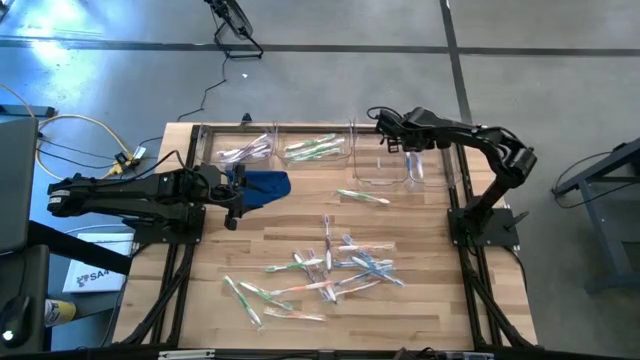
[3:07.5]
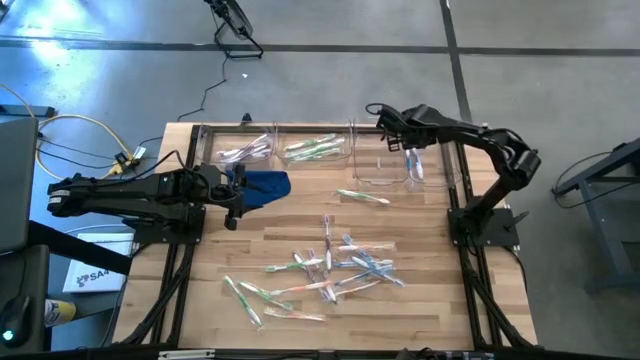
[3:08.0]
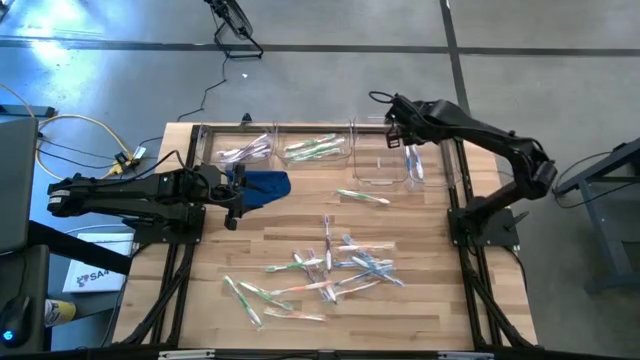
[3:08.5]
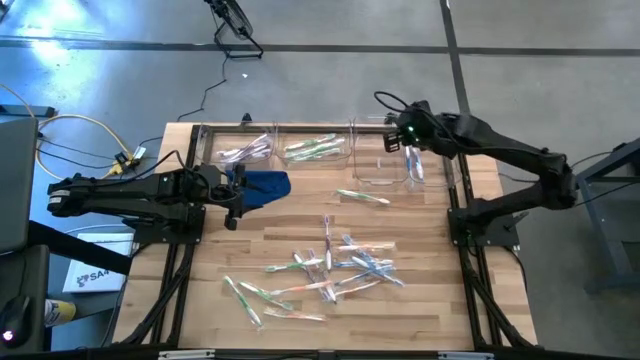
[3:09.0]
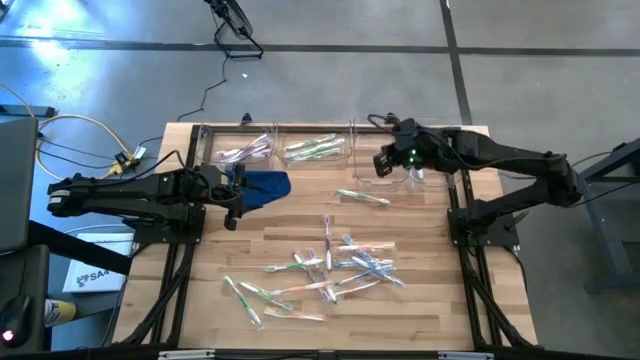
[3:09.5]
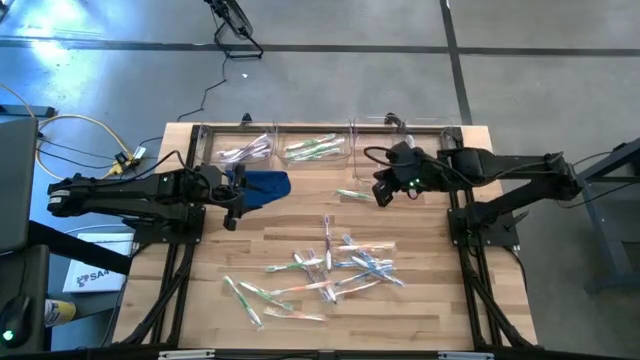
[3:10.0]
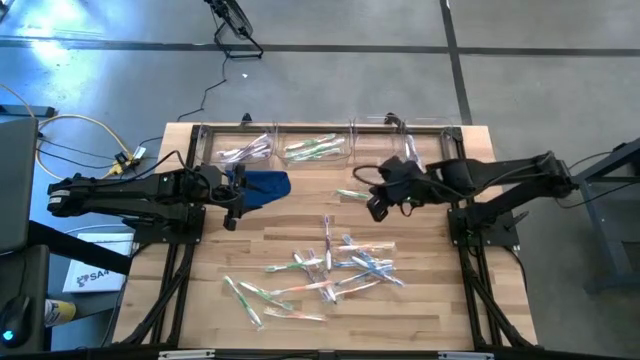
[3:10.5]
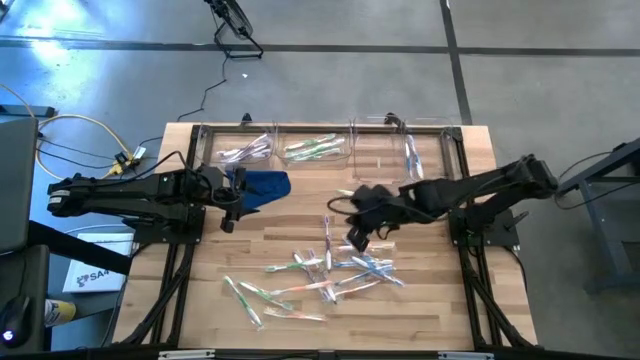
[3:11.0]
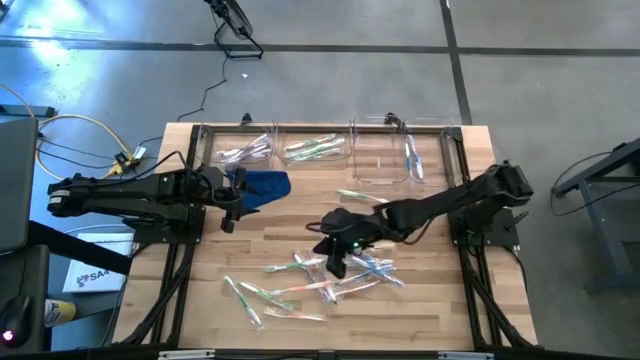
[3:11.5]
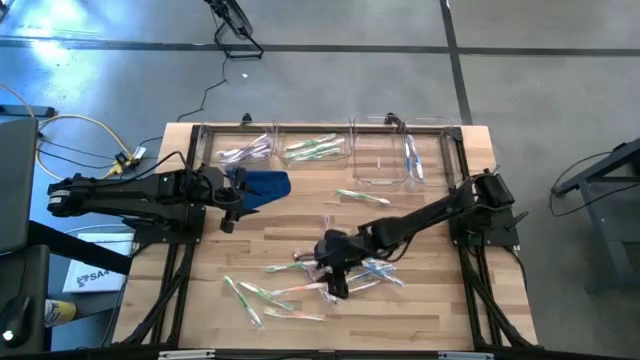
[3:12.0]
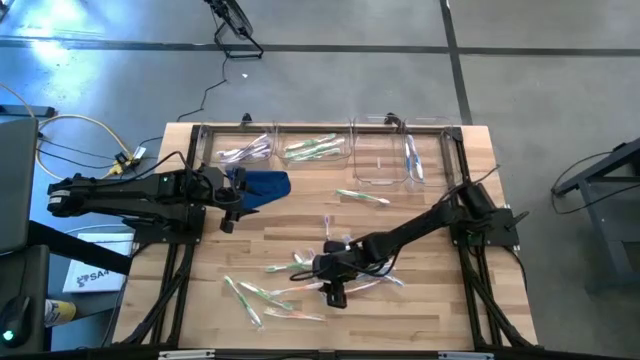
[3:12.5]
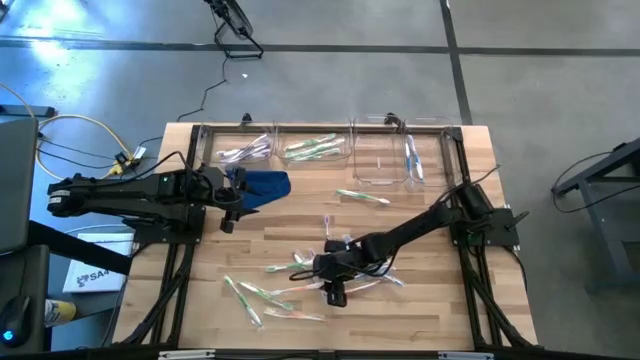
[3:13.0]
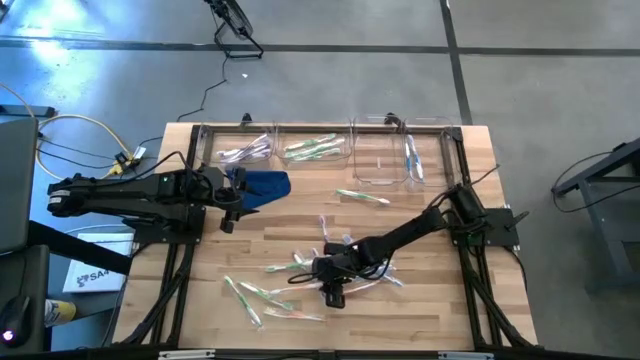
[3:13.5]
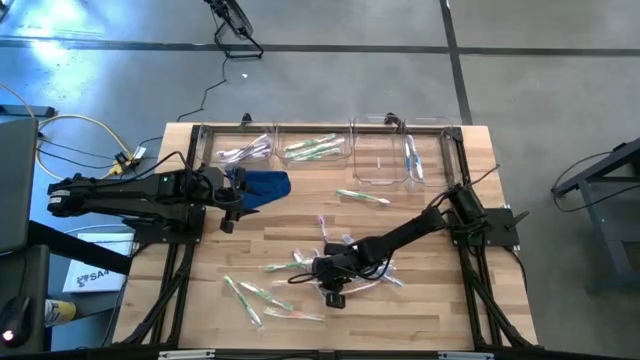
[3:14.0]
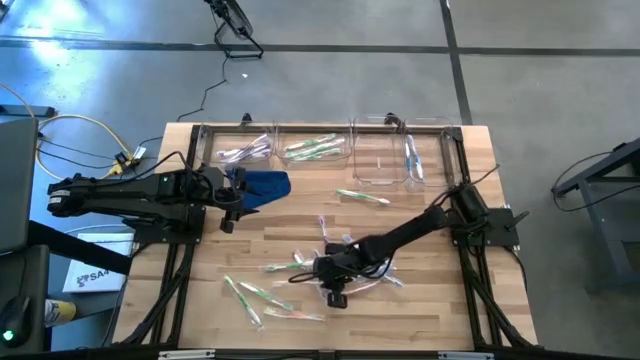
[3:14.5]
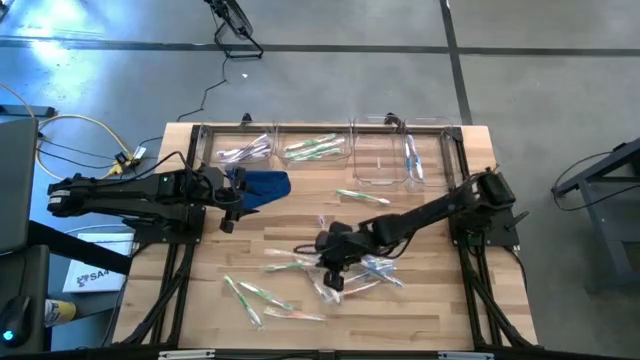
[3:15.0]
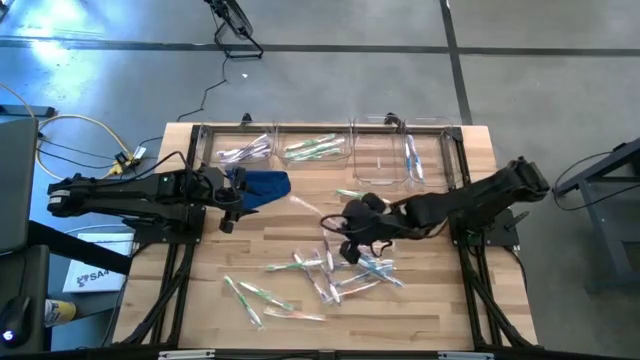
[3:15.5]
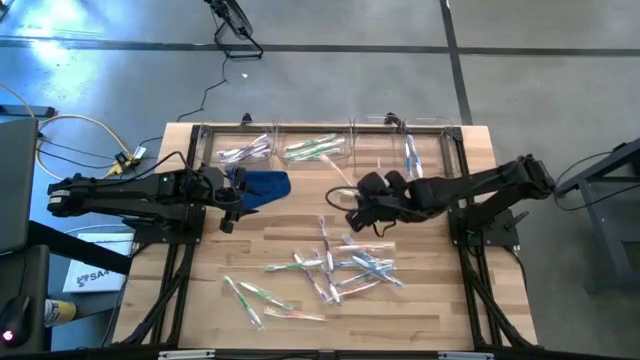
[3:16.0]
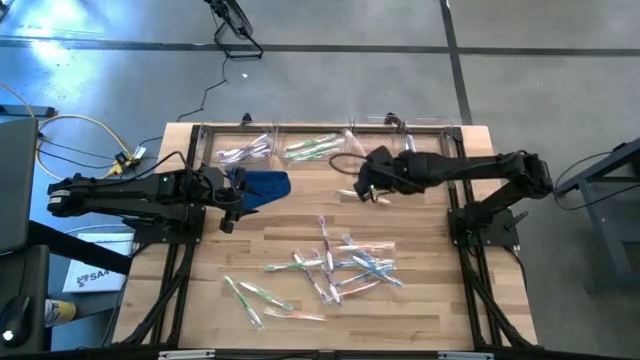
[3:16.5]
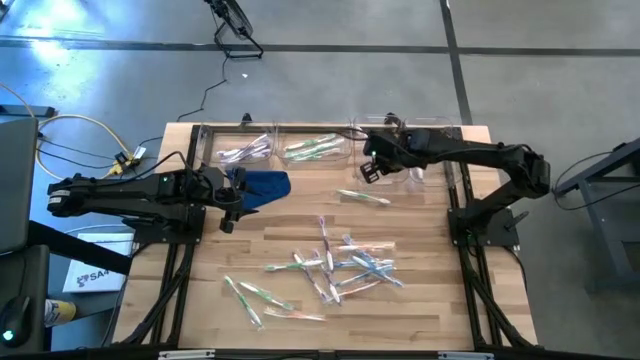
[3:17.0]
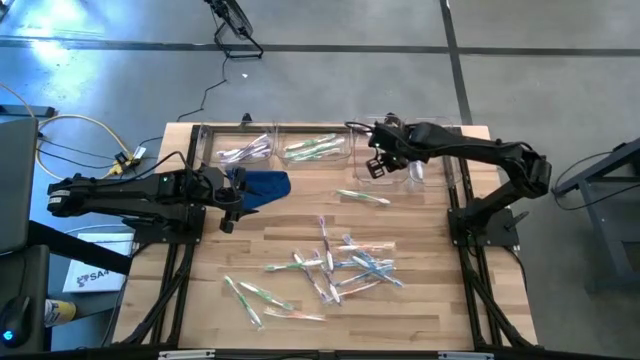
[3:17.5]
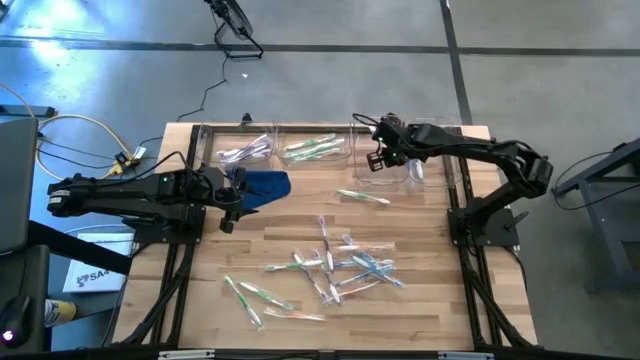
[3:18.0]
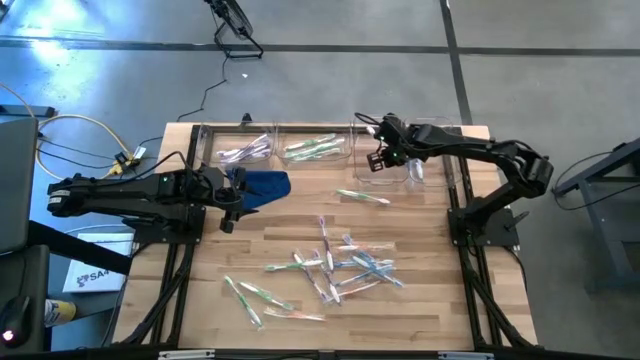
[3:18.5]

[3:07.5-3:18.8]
Task: Pick & Place Toothbrushes
Put the orange toothbrush into the middle right transparent bin

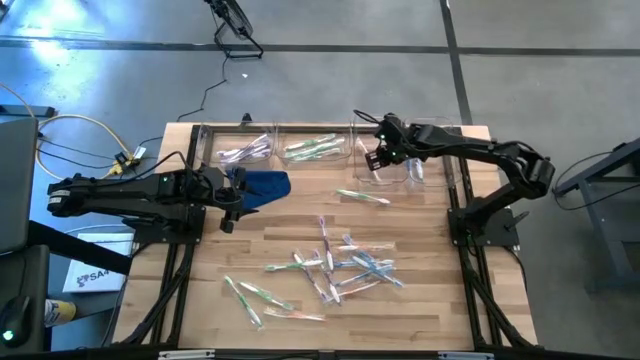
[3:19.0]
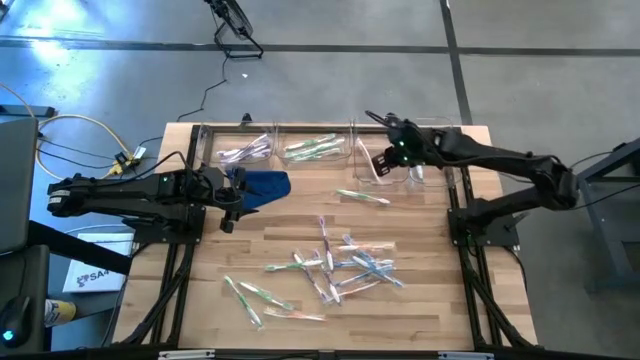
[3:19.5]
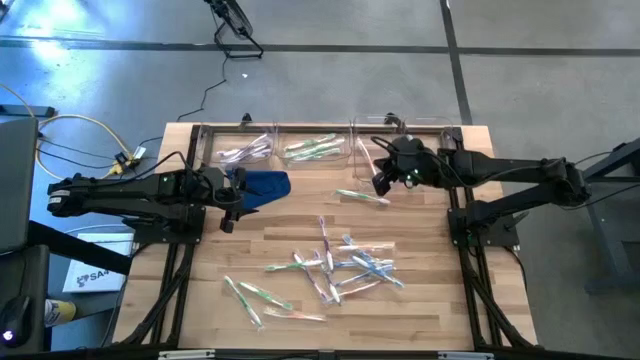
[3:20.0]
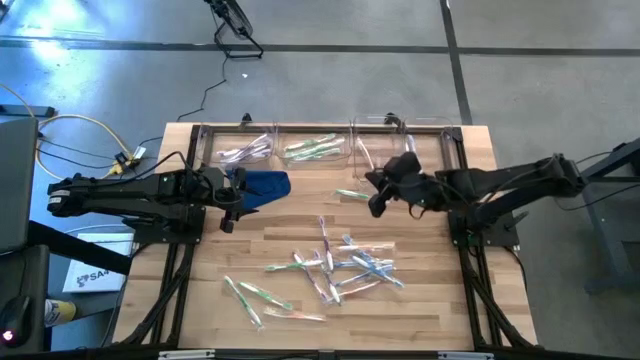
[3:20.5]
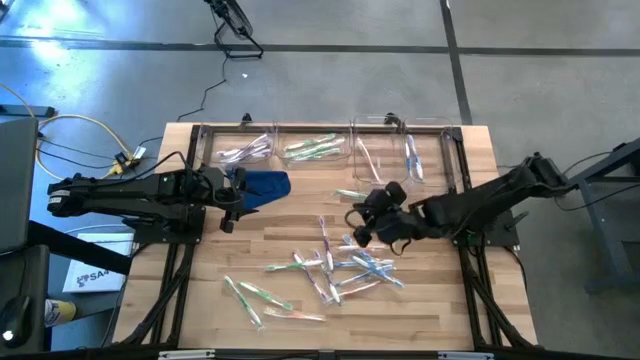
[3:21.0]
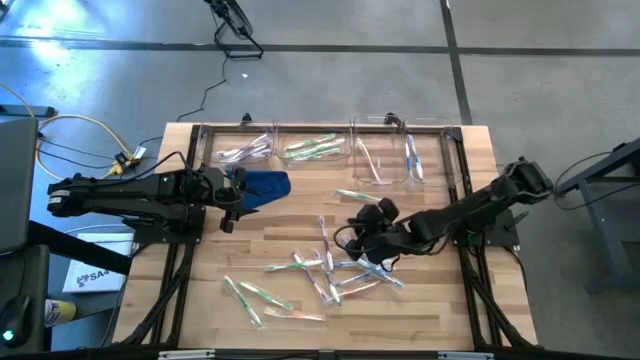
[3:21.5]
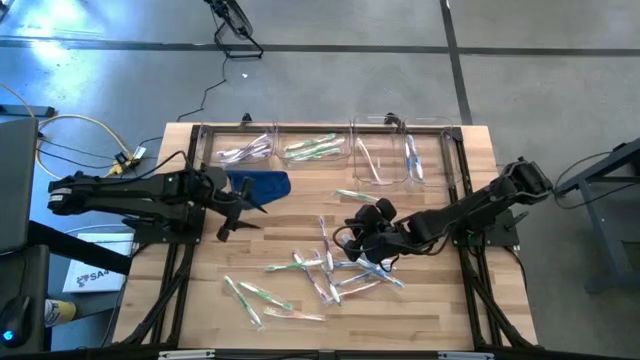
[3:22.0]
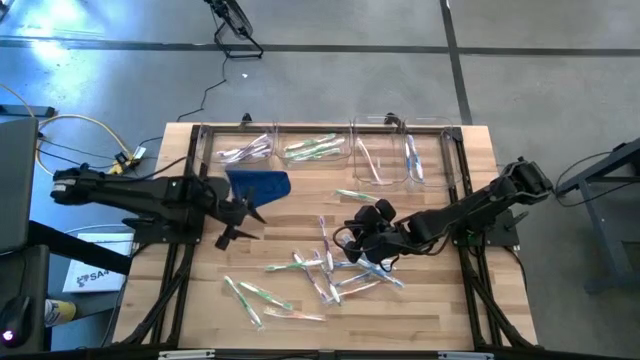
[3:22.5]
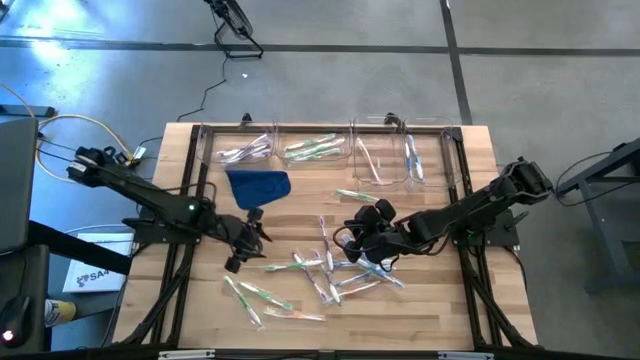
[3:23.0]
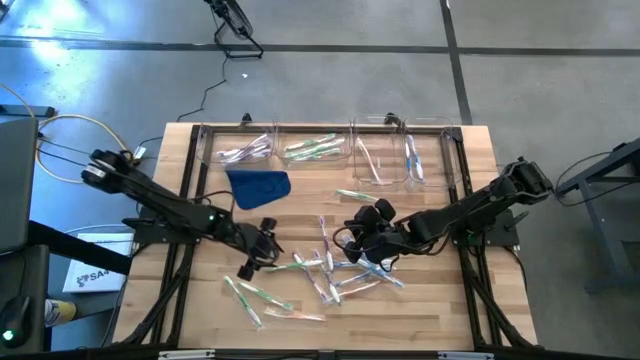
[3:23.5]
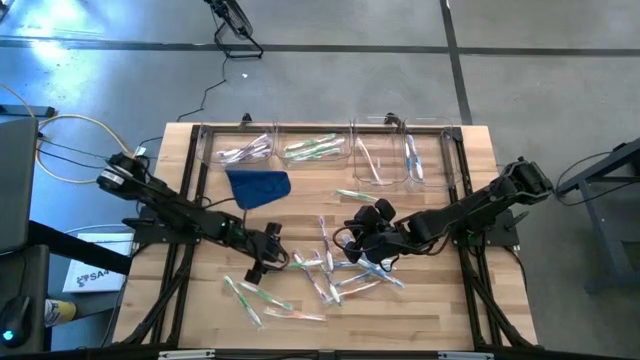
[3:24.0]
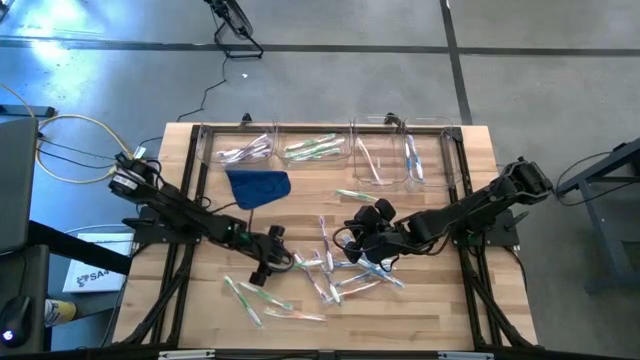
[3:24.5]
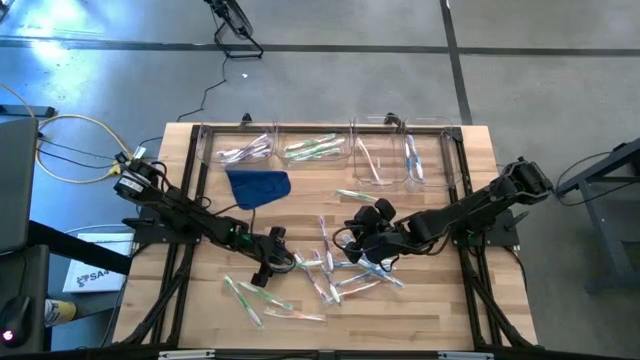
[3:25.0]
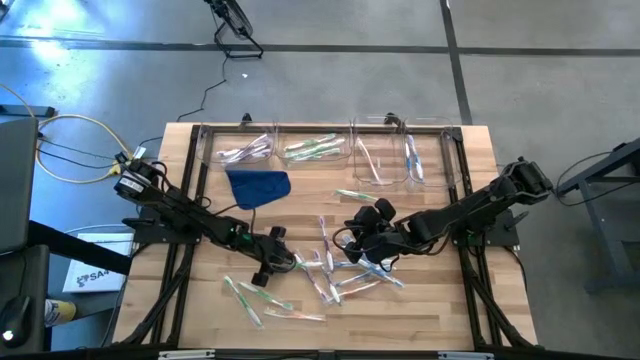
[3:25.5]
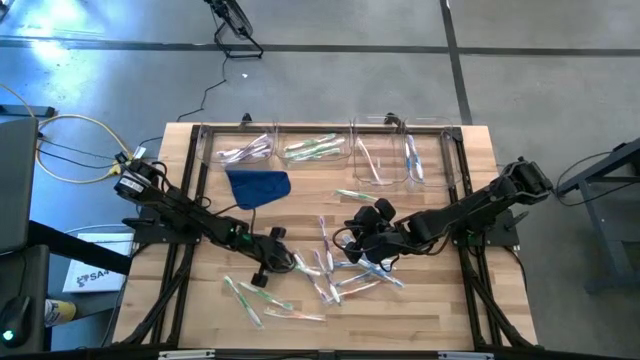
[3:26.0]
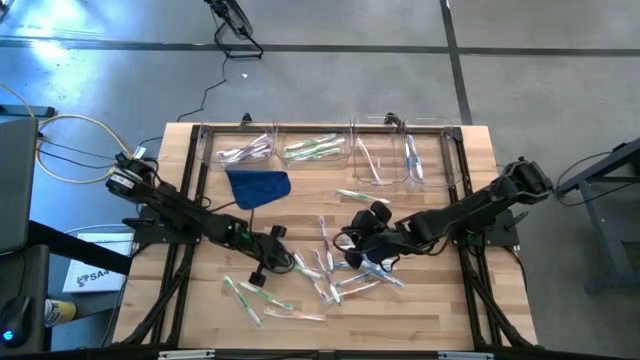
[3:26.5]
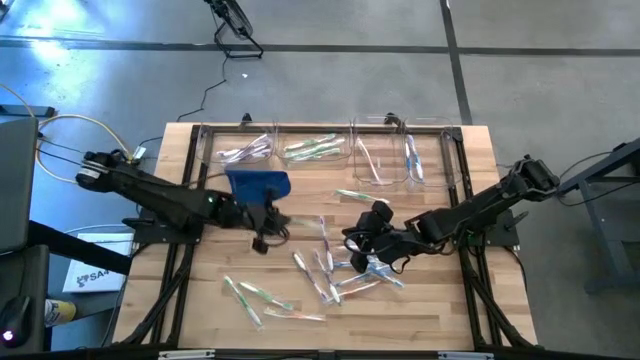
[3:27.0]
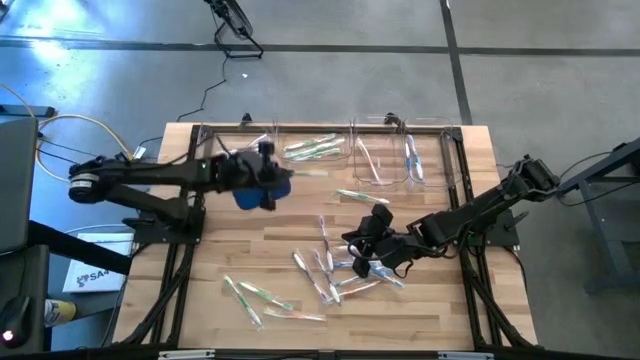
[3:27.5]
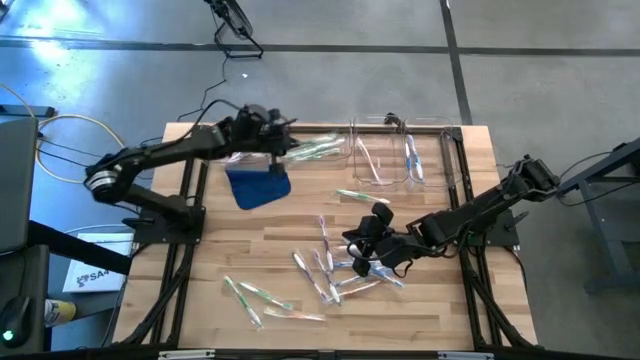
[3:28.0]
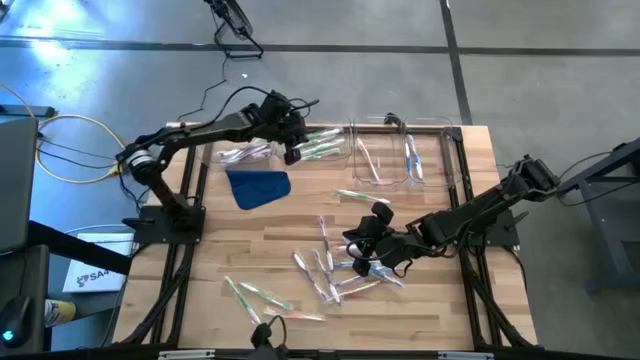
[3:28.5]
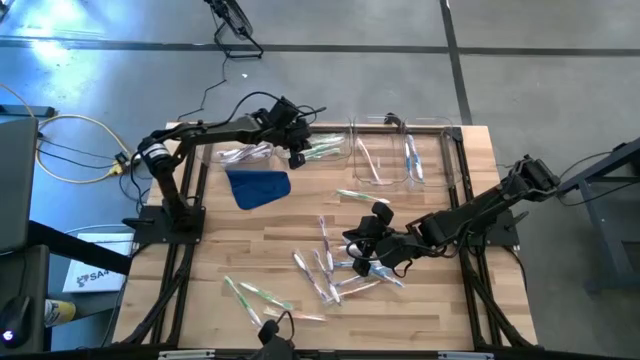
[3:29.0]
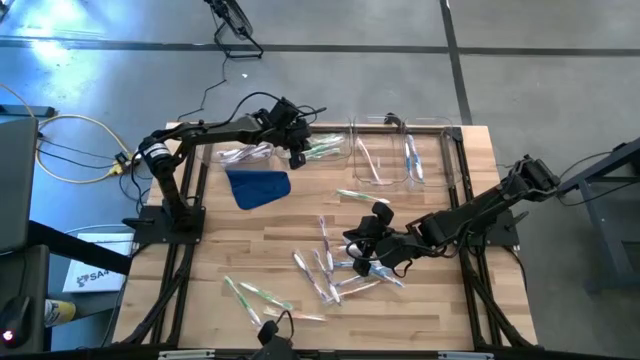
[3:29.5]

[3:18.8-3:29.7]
Put the green toothbrush into the middle left transparent bin
